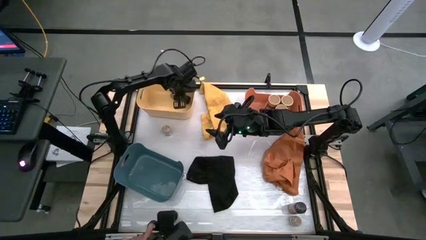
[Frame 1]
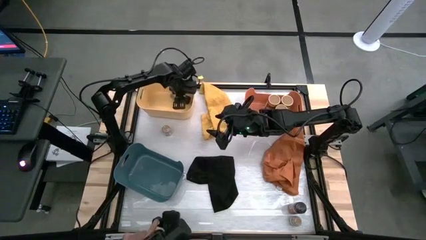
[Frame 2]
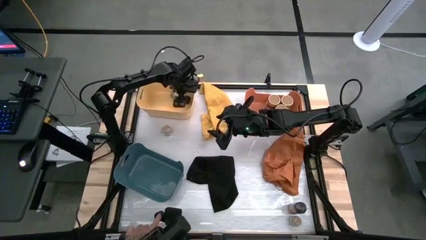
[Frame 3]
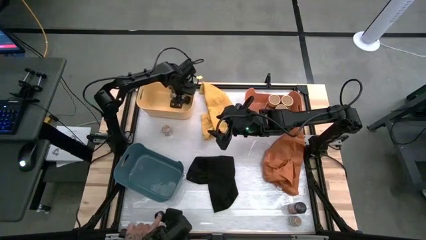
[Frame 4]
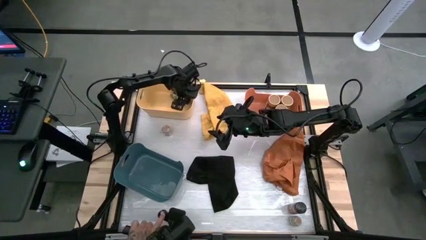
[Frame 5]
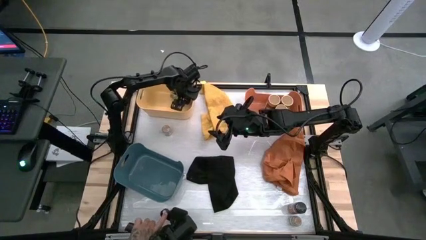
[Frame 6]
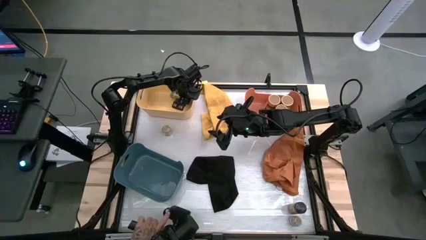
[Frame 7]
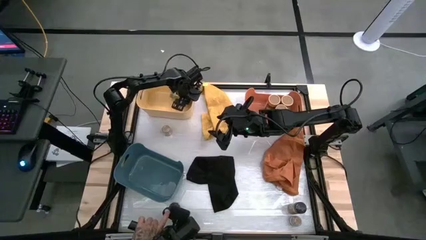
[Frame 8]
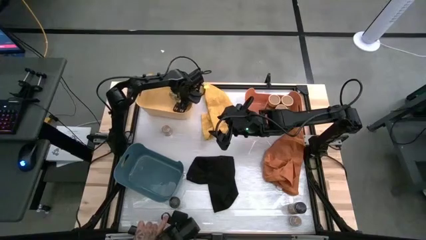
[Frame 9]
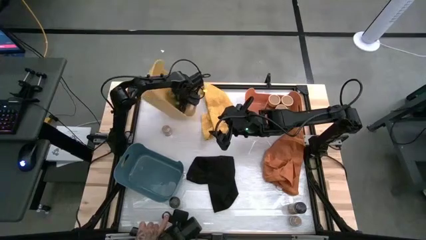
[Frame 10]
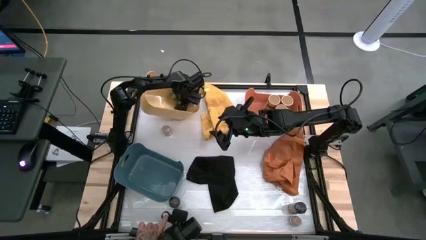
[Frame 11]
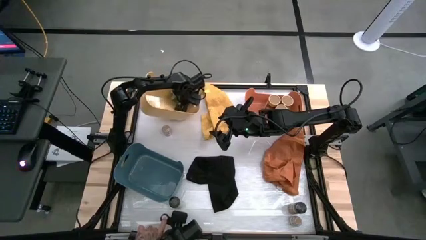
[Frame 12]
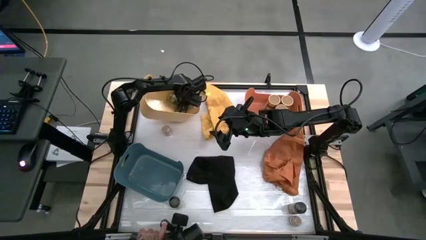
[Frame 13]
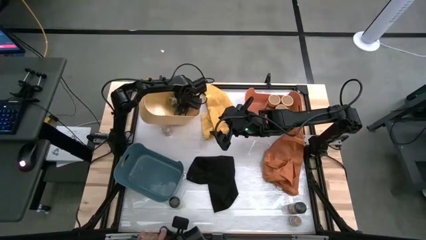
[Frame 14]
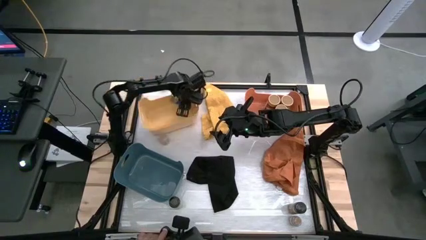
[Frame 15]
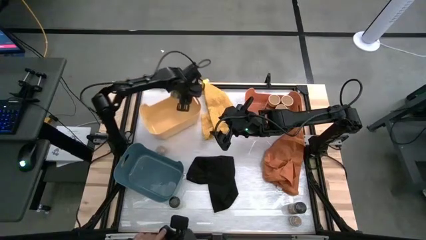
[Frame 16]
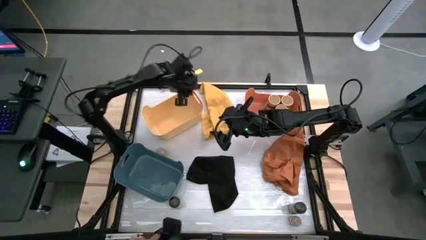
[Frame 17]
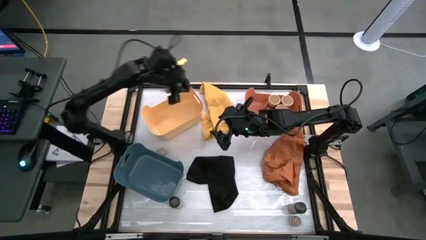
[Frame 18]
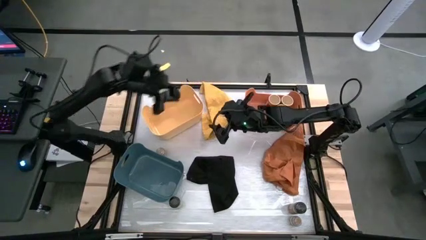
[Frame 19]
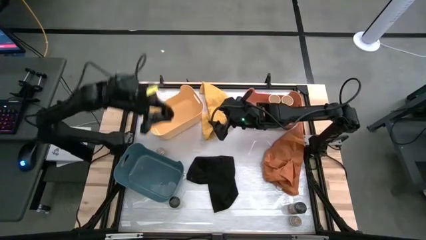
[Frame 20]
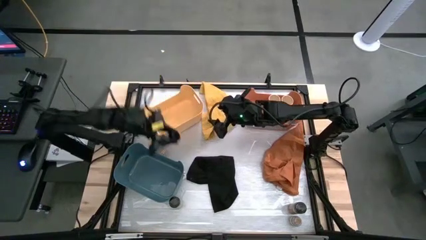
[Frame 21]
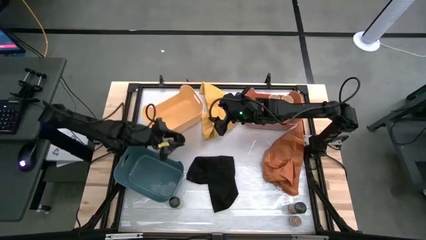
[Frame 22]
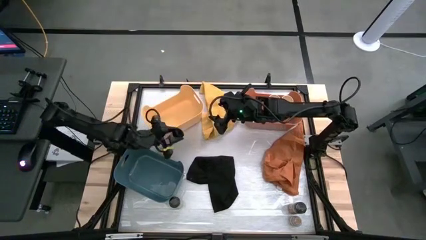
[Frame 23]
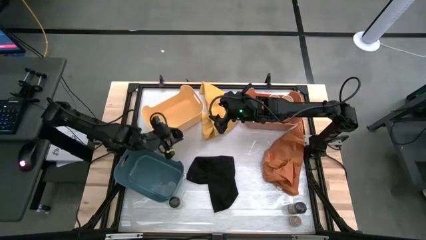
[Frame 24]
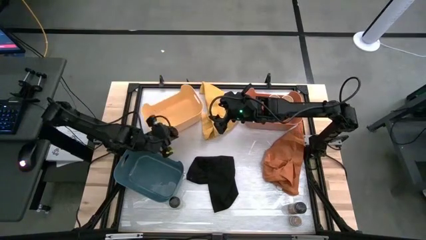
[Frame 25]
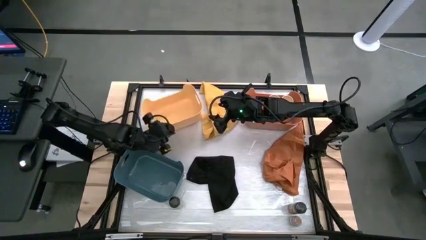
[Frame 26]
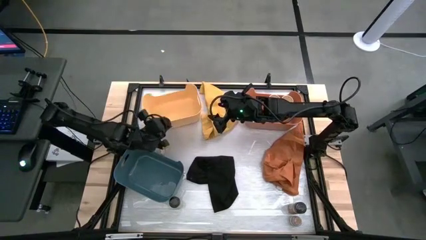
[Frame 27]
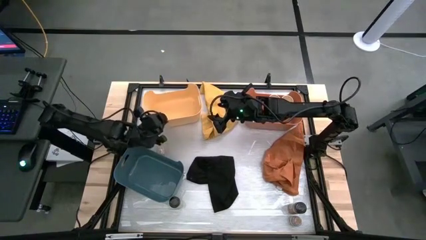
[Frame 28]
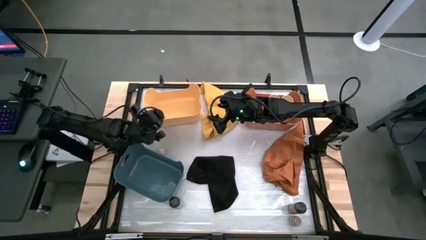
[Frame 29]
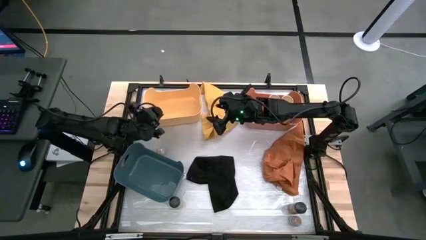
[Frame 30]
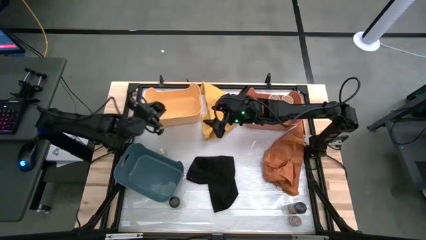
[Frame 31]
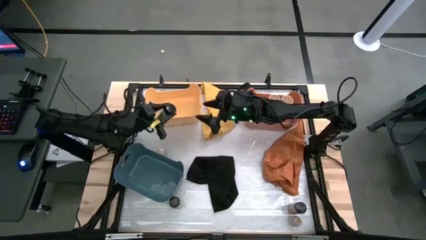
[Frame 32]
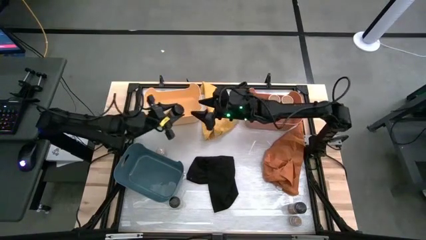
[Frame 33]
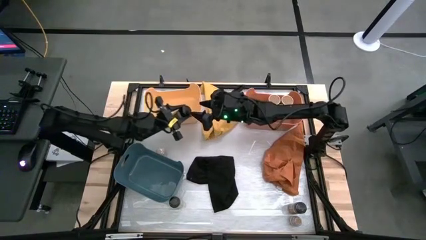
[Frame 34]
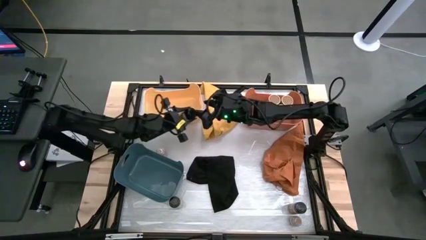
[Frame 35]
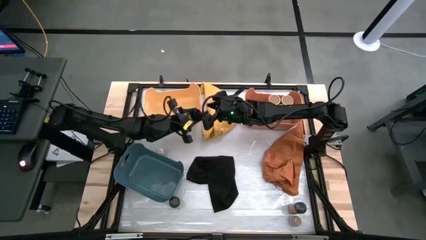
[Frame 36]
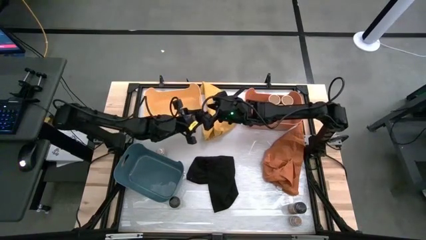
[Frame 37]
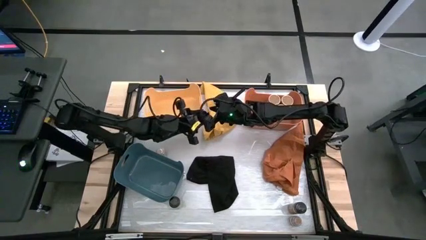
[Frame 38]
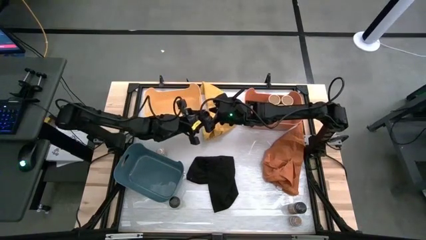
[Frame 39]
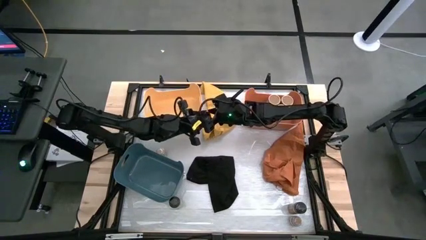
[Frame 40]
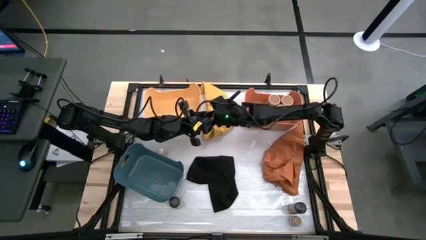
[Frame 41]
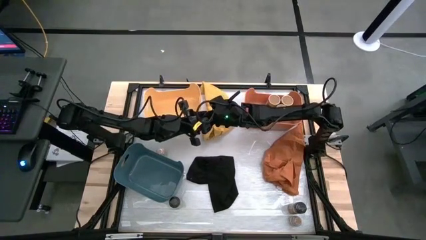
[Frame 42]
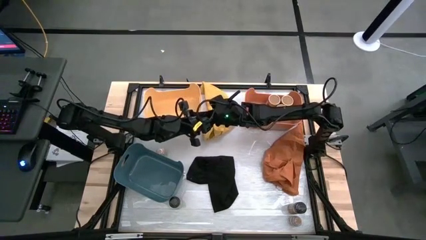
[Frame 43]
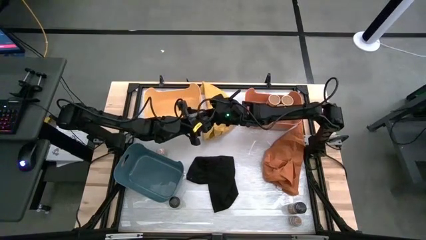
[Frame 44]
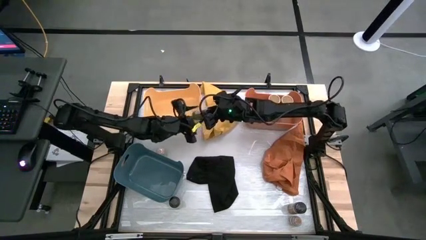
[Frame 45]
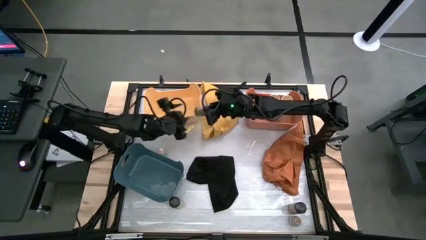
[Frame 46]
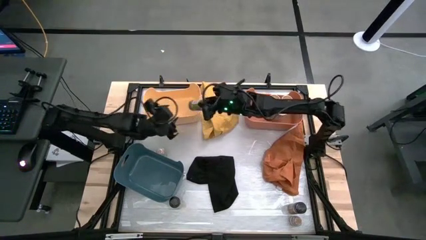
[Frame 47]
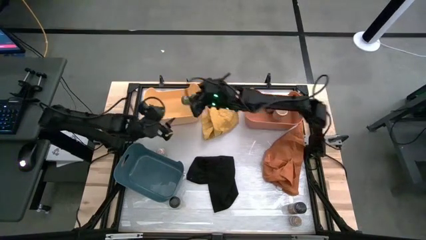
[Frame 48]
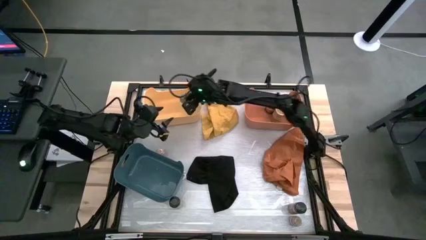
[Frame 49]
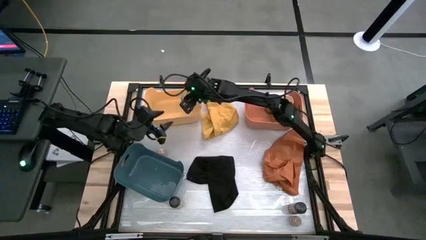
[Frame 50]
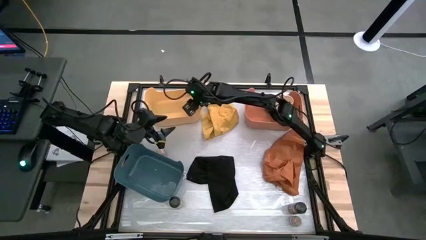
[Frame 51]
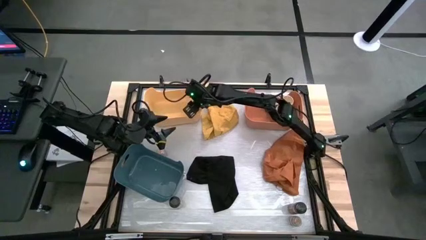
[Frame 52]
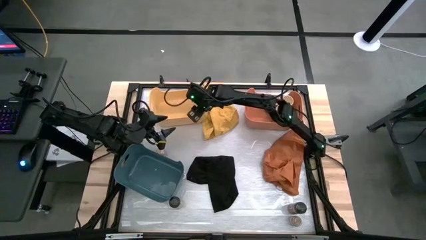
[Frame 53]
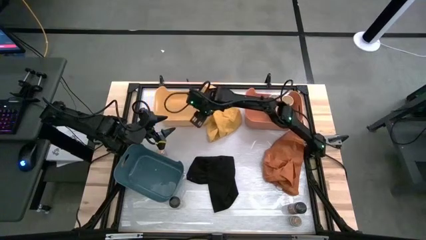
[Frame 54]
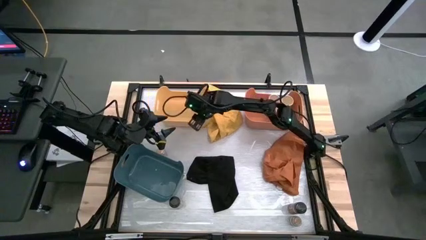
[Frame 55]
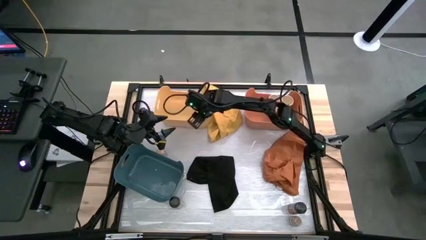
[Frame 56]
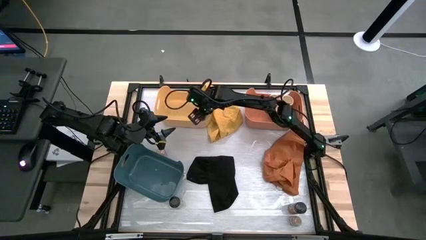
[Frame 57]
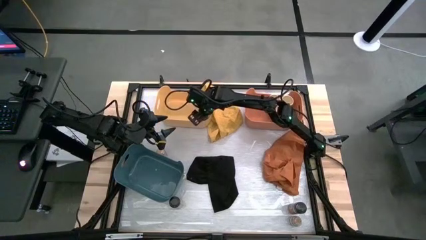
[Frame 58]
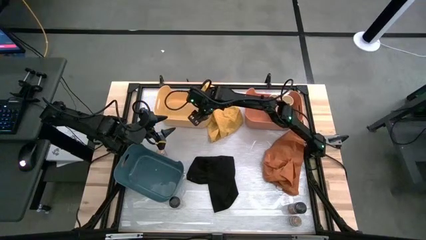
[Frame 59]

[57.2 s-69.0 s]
Task: Sort spices by type
Put the top black spice bottle in the yellow bin

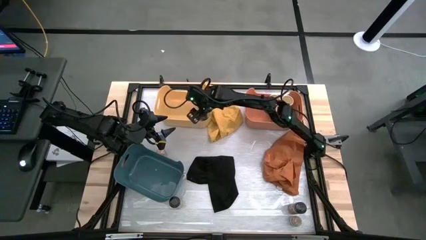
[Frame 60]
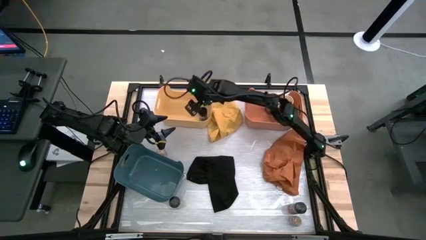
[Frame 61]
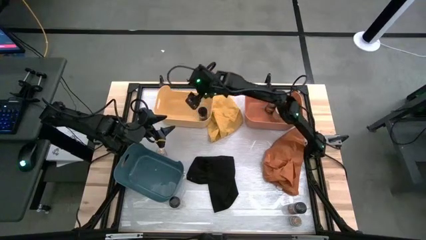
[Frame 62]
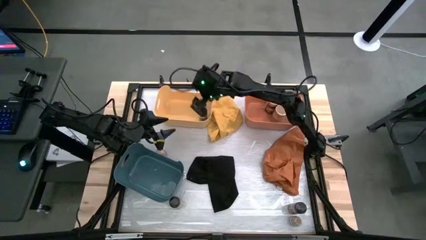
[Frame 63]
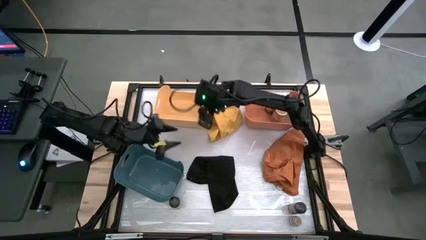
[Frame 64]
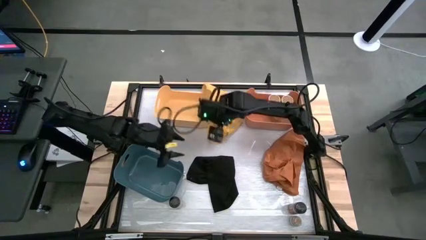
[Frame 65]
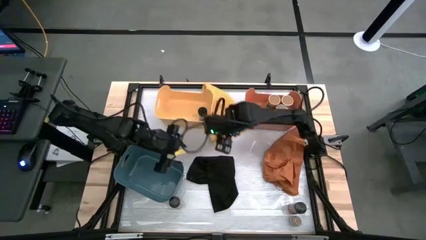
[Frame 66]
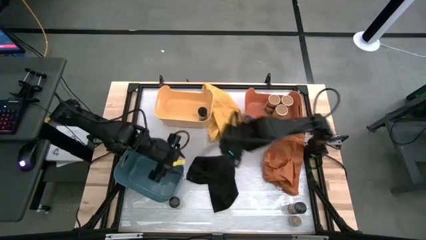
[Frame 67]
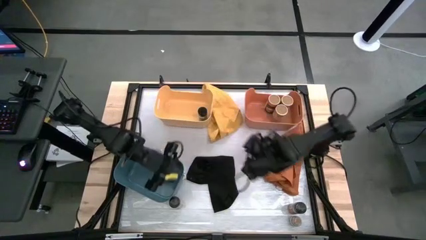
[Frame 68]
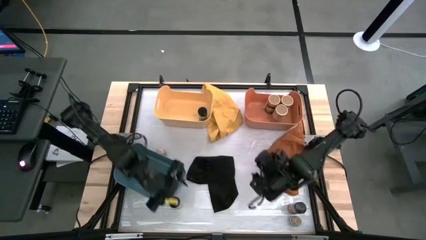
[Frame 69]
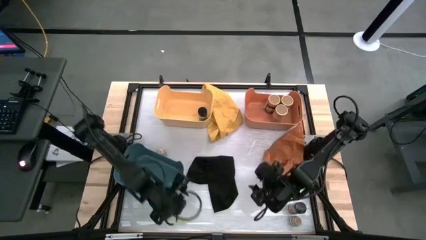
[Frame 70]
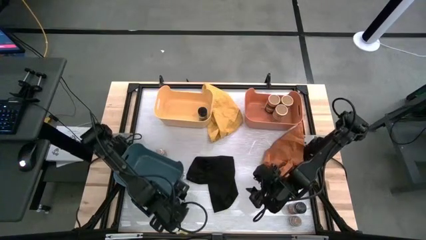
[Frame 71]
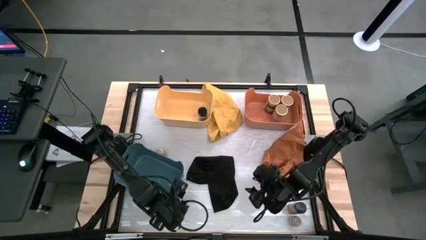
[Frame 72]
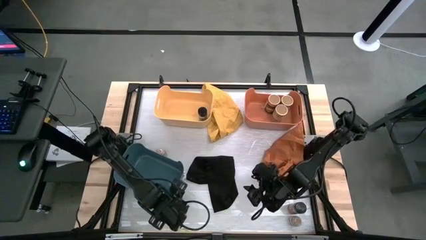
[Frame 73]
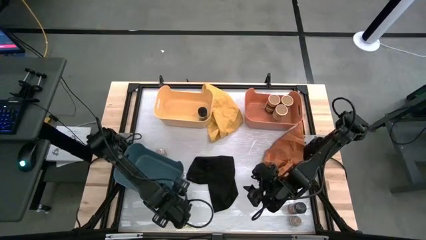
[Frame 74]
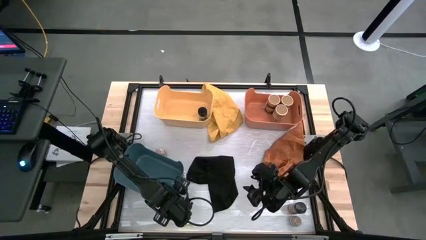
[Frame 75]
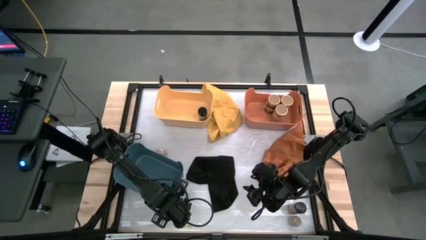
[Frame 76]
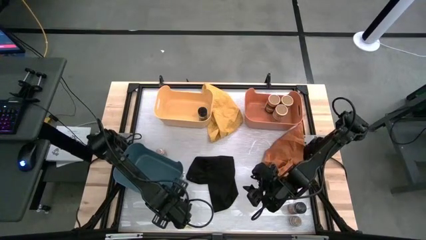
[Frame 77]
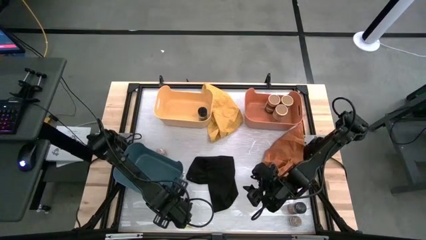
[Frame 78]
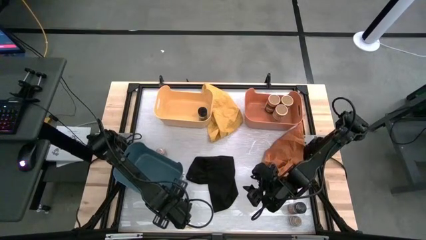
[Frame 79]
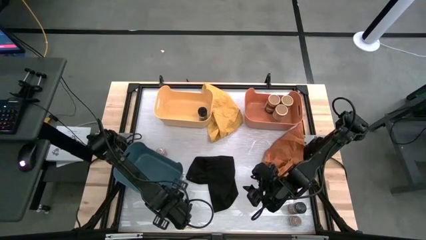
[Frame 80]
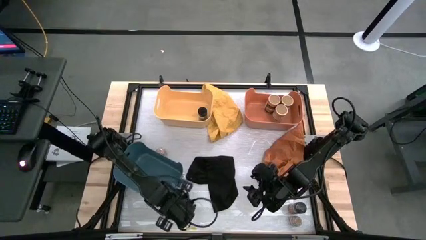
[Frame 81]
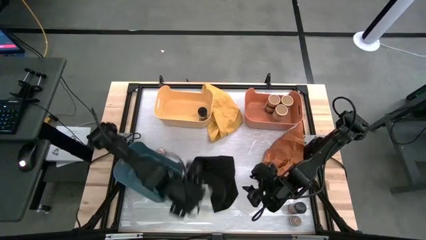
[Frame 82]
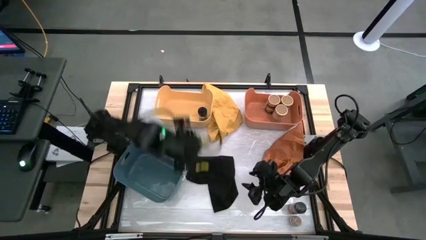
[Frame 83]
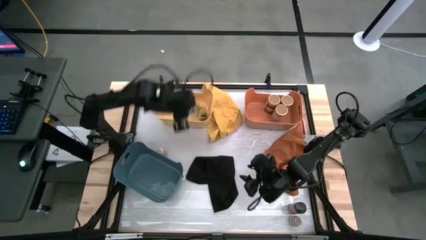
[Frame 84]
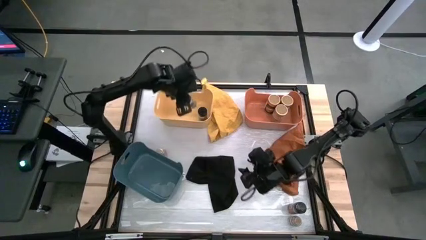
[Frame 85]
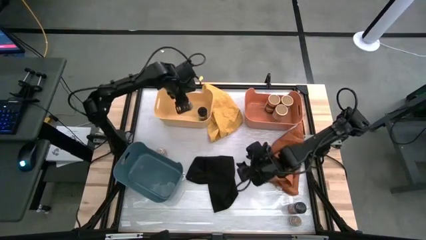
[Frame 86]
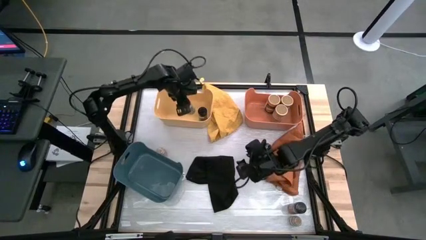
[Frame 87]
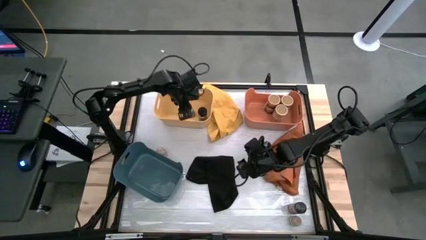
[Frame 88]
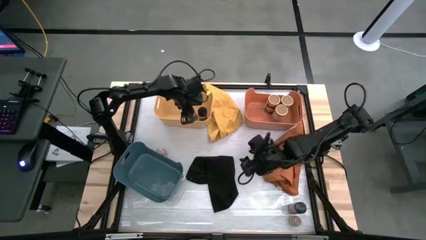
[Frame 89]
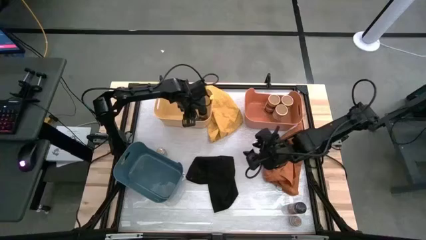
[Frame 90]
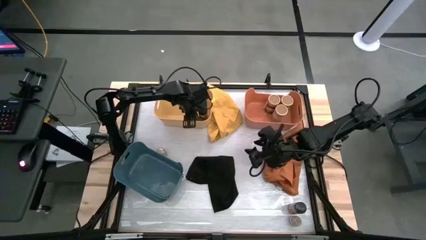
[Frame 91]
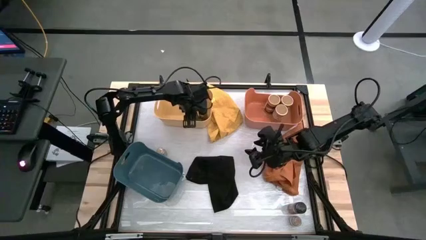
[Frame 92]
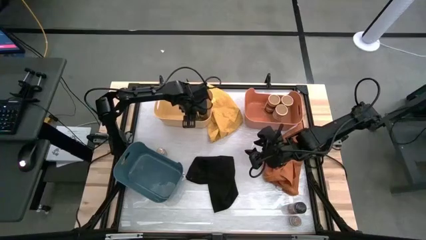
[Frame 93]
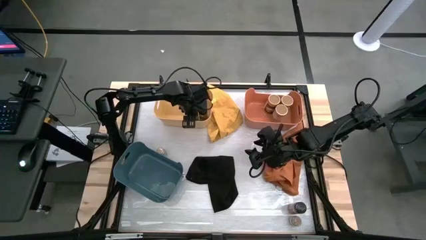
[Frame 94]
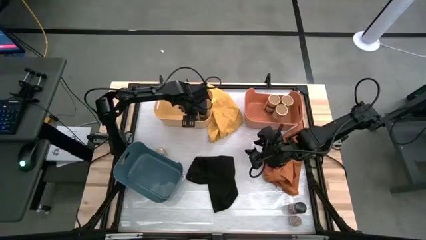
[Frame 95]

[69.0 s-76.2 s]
Put the left black spice bottle into the yellow bin
